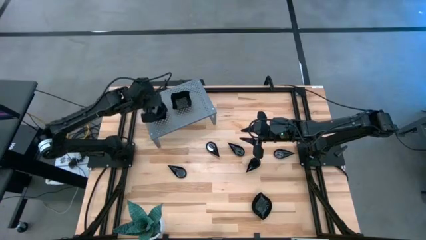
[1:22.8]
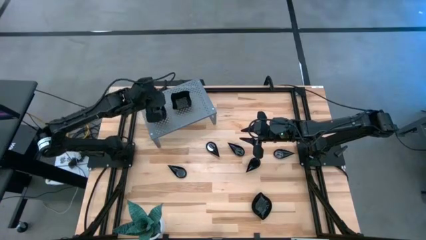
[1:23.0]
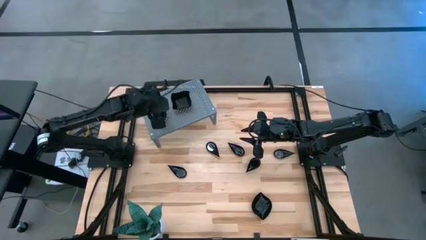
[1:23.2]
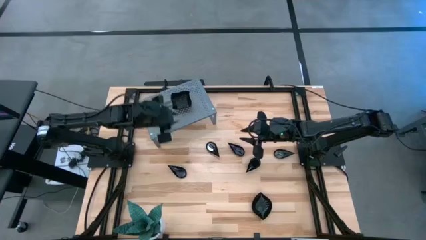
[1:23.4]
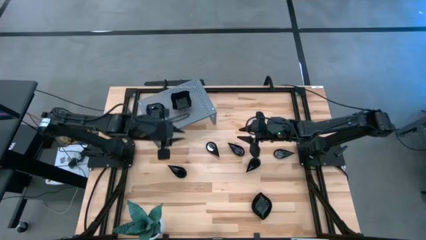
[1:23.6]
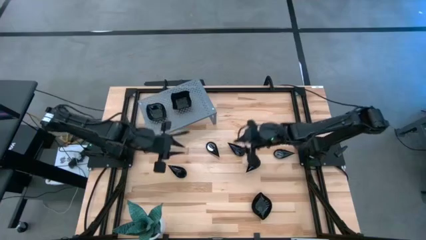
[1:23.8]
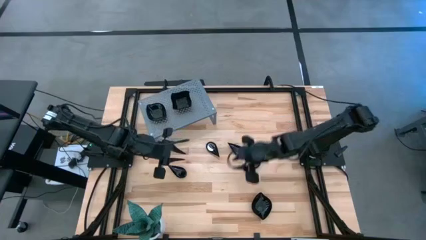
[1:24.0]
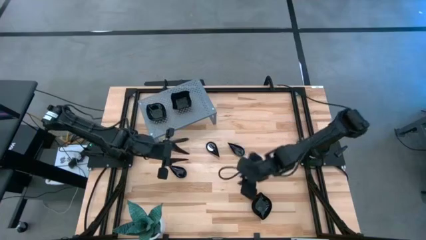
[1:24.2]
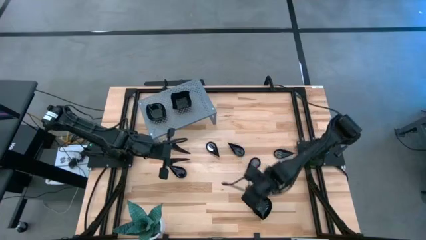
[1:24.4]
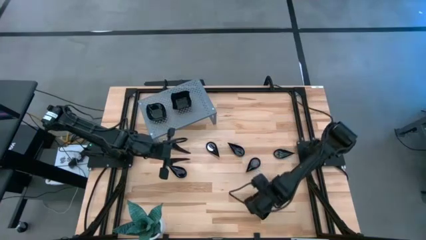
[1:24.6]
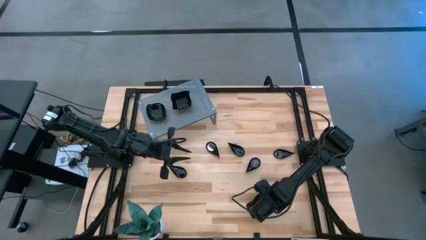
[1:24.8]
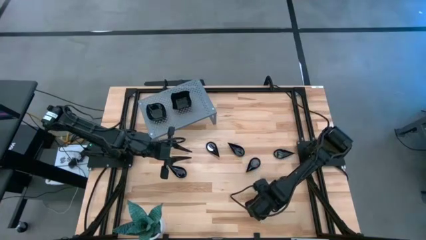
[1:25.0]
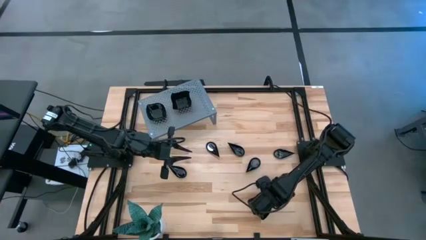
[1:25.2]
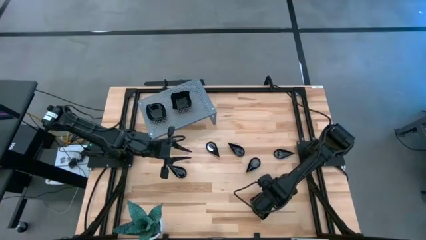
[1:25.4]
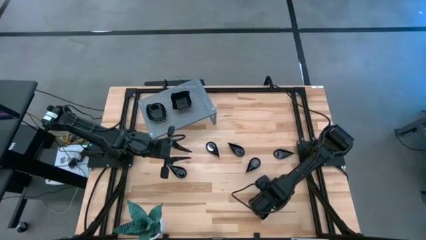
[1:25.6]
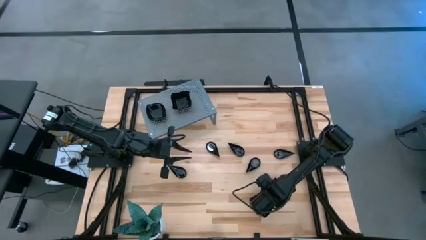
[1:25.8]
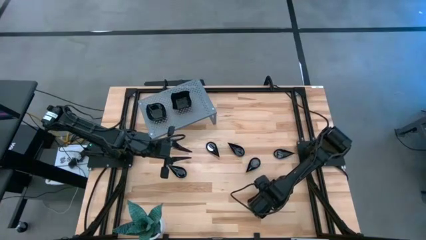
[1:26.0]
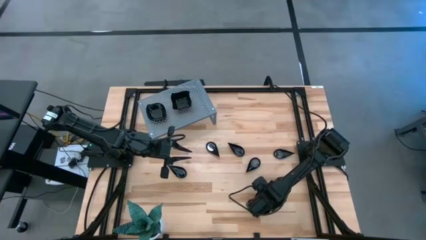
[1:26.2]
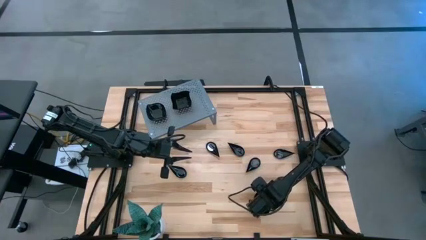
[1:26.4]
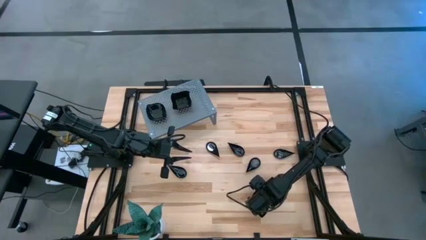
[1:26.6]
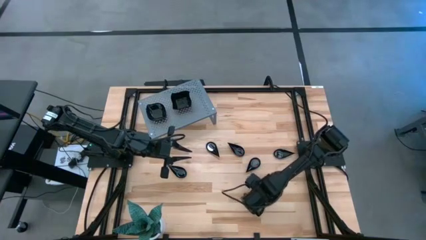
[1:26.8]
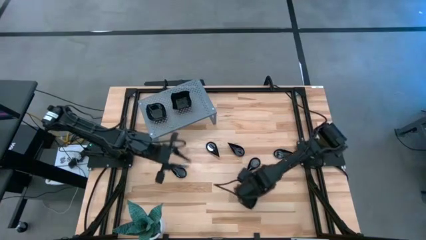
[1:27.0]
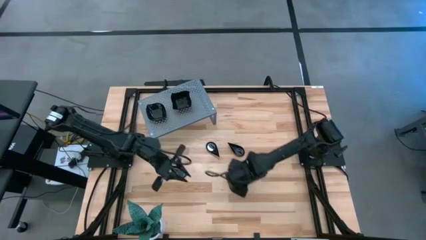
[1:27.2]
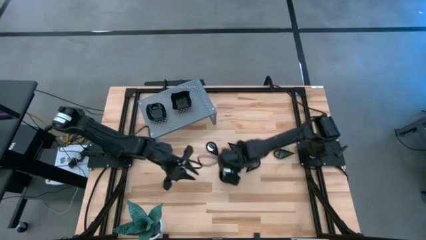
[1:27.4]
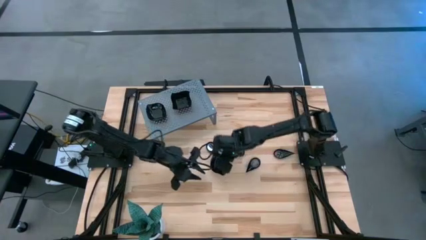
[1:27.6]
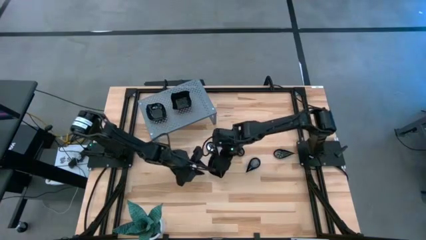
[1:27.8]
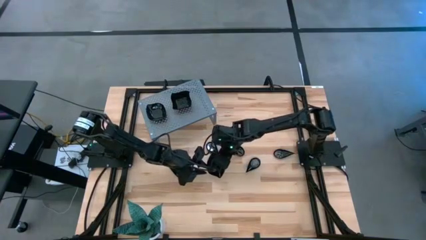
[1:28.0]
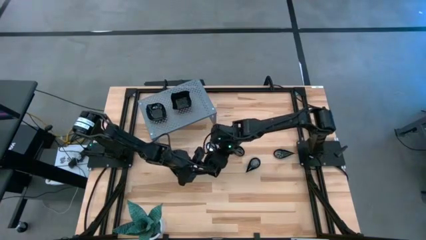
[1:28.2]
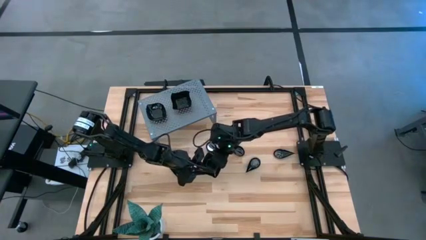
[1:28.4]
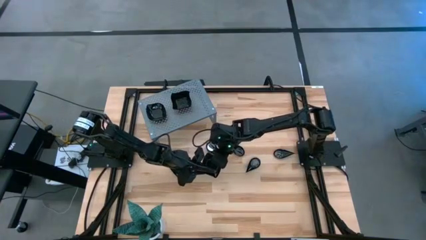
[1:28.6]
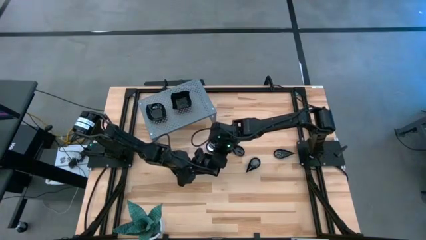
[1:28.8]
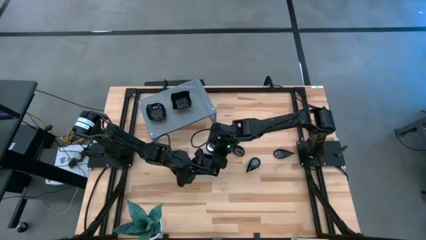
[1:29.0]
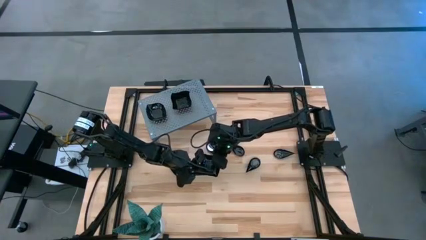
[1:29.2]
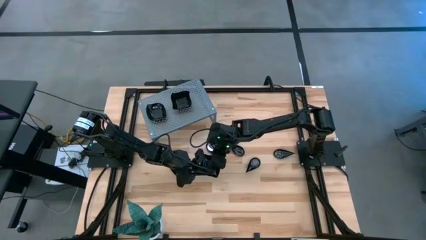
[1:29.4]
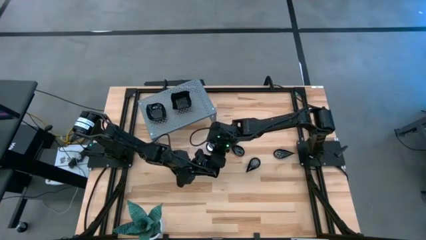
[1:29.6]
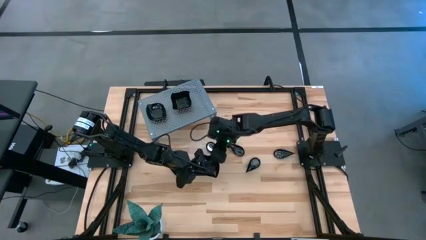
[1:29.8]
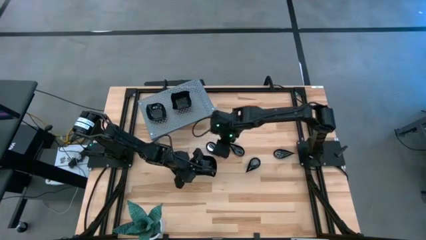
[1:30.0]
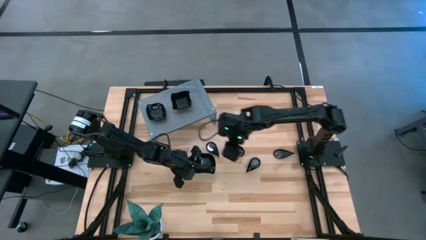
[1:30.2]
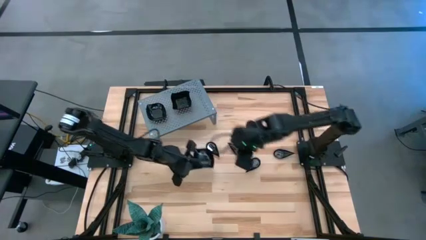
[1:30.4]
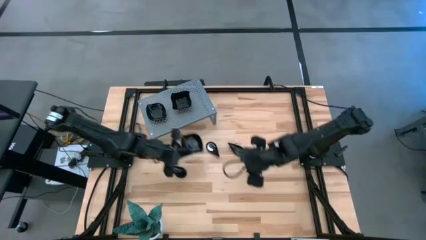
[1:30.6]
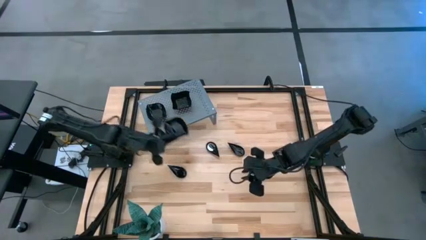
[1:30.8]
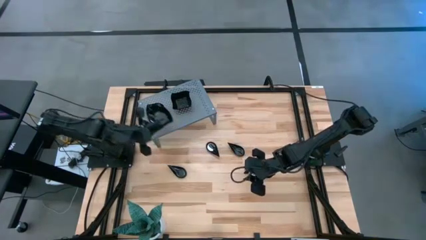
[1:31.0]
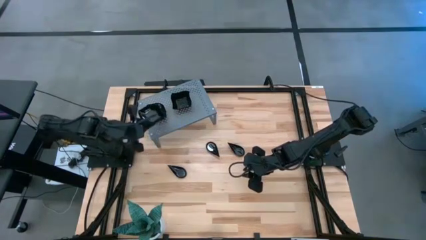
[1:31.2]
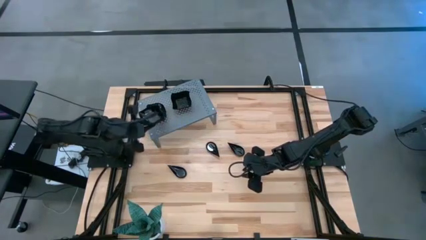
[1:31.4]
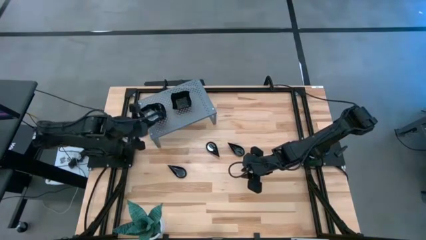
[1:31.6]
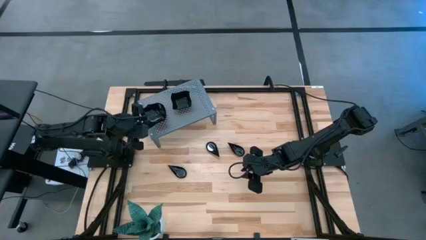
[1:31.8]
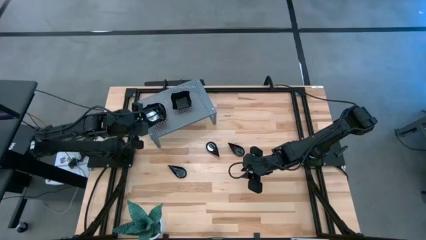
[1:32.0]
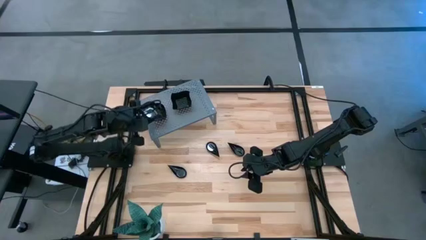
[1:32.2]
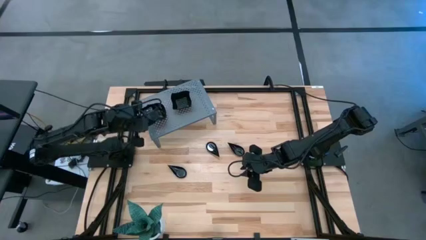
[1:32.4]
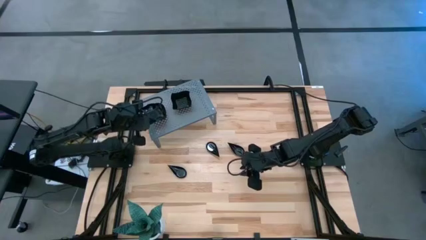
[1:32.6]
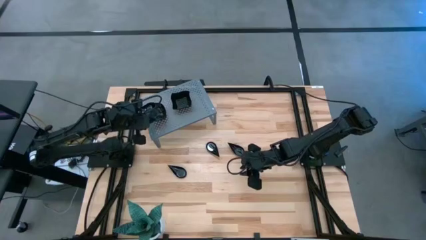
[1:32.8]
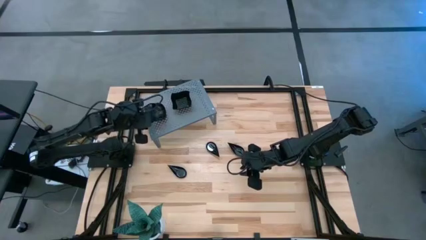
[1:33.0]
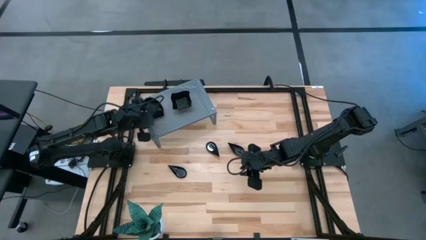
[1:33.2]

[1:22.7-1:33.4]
Task: Pick & Place Mini shaped plates
Stack the black leaf-shaped plate on top of the black leaf-shaped plate on the shelf

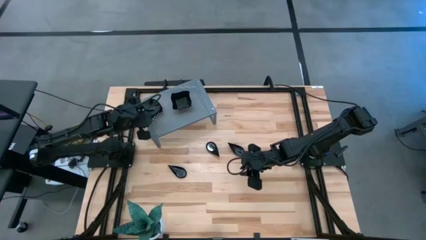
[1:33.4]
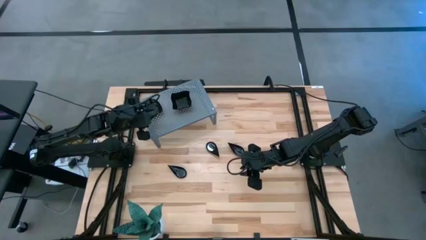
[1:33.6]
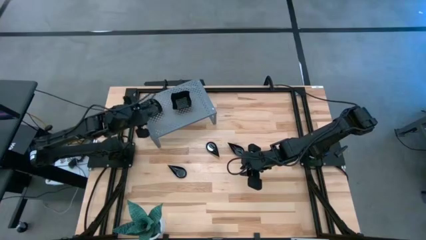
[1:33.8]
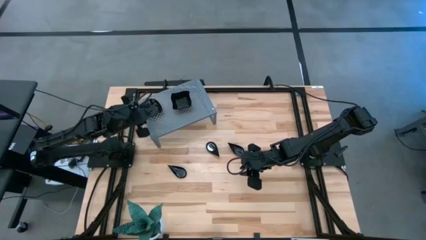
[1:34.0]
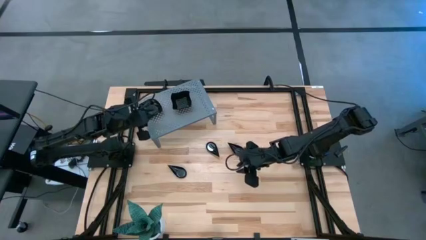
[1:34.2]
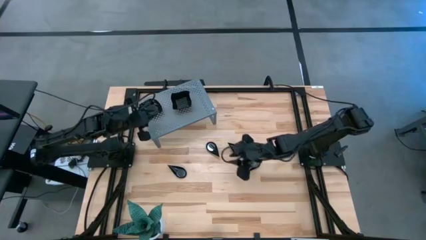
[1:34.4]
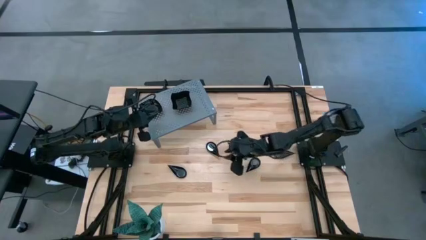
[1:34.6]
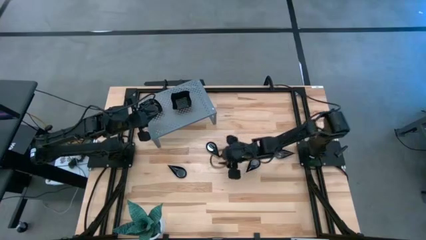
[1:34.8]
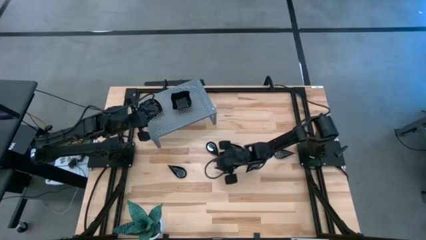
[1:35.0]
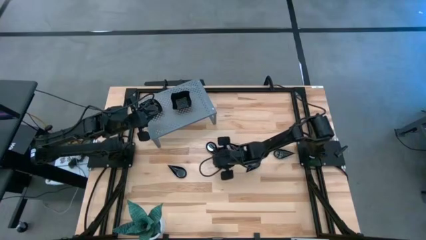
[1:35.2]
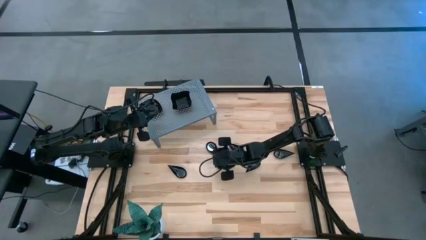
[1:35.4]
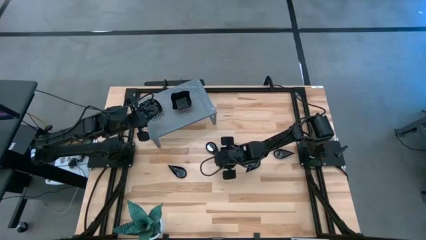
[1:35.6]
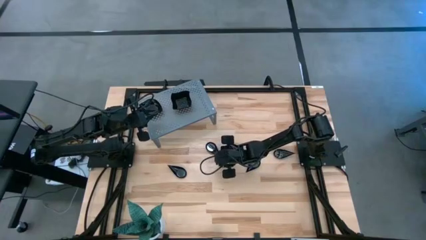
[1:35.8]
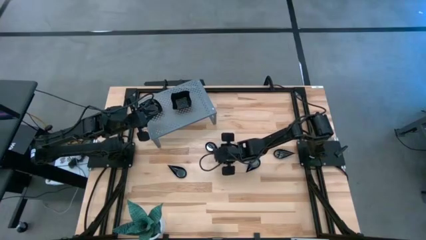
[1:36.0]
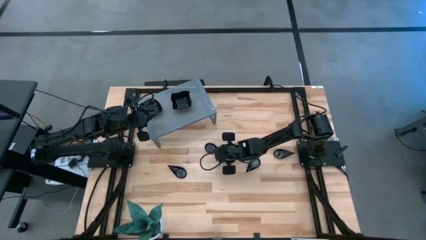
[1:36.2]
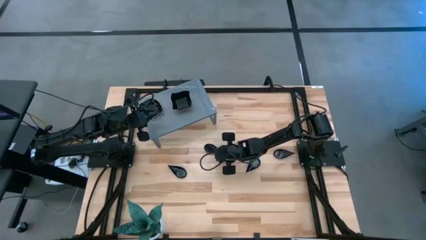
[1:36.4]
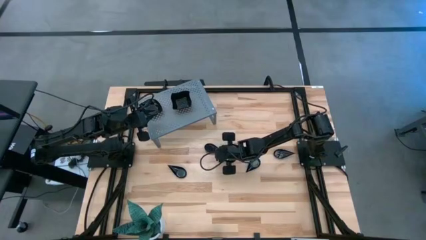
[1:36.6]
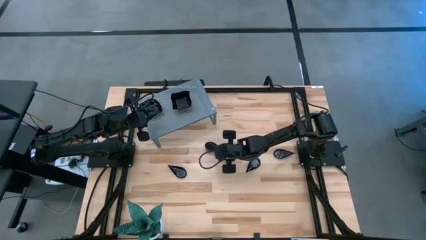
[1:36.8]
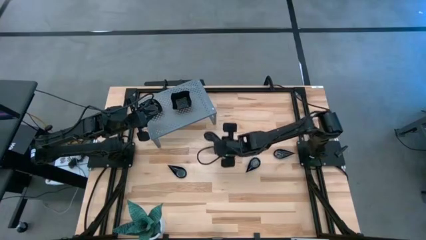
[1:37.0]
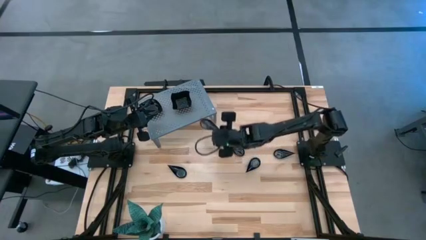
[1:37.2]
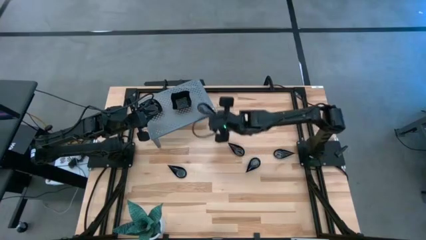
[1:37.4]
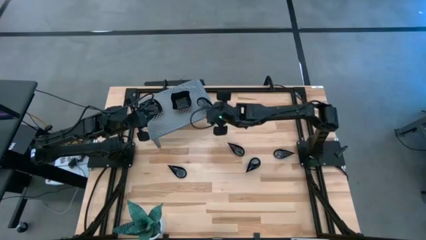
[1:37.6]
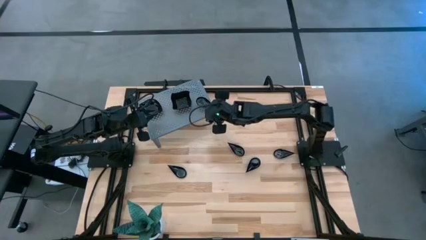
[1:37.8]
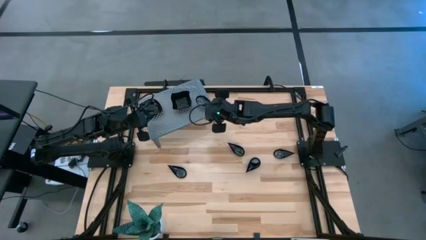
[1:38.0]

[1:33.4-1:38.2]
Put the black drop-shaped plate on the shelf

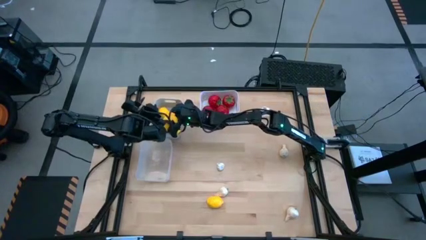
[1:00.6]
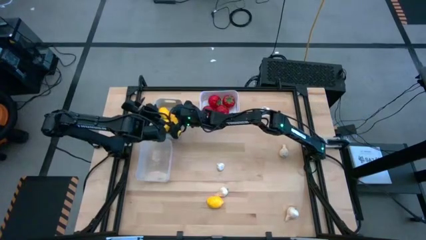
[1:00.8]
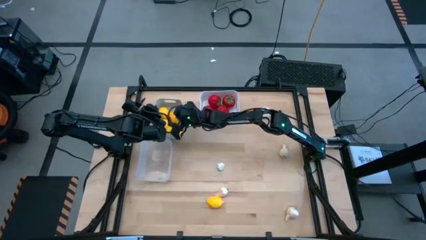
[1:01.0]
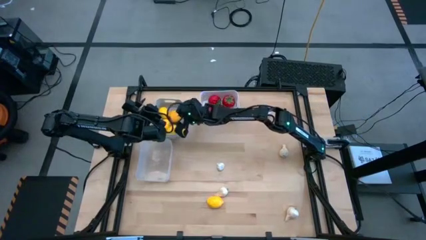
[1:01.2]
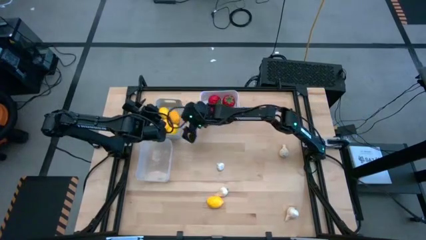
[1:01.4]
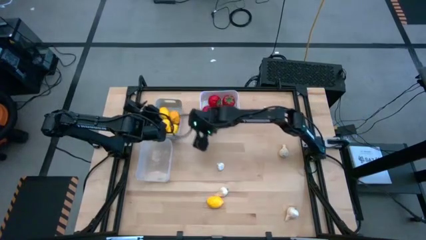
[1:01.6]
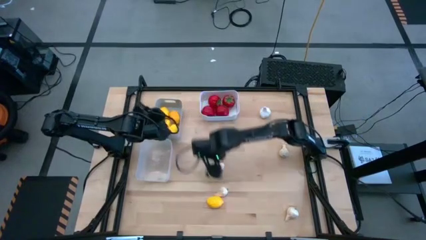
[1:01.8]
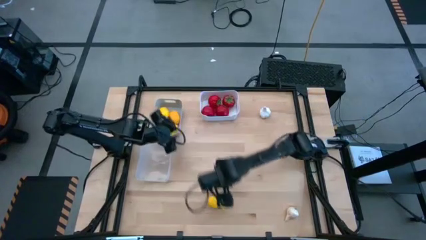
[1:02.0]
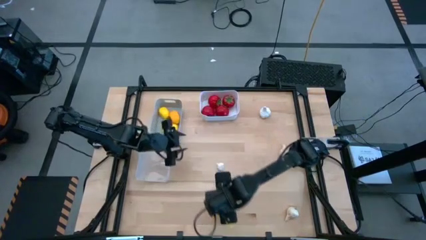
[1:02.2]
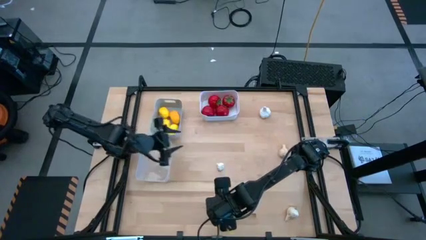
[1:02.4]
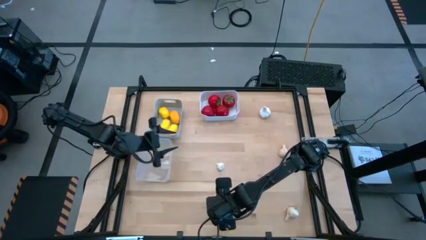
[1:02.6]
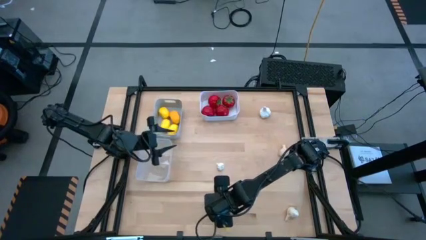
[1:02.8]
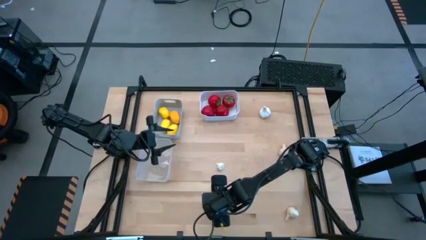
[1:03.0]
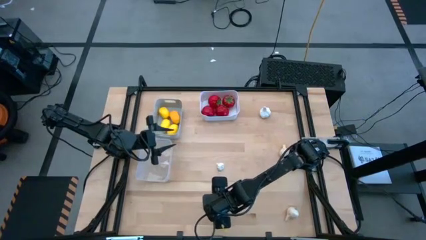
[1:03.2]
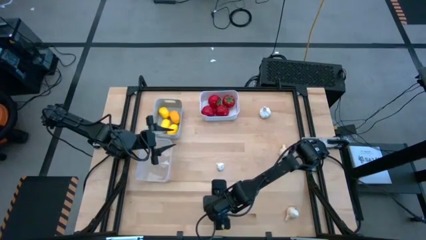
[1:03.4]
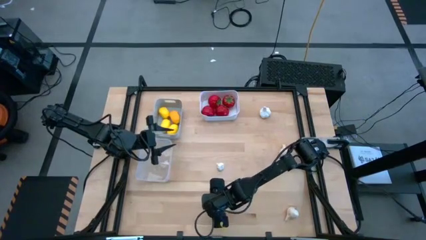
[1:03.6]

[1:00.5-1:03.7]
Task: Sort produce into baskets
Put the yellow lemon into the gray bin
